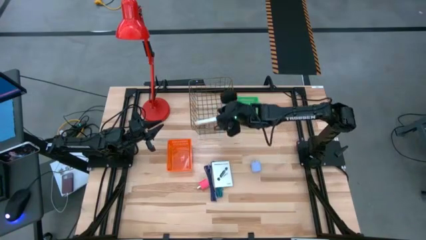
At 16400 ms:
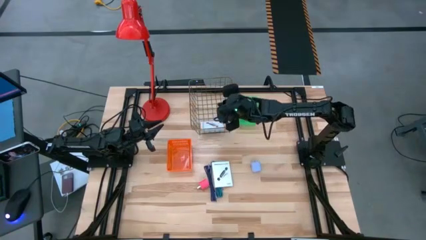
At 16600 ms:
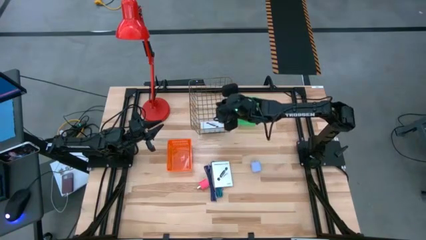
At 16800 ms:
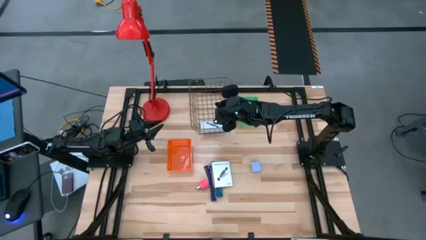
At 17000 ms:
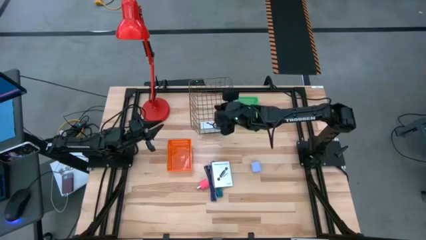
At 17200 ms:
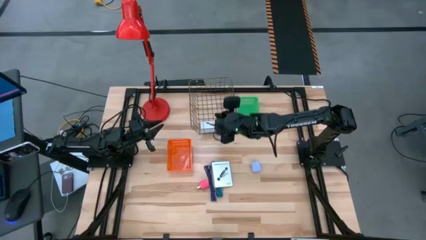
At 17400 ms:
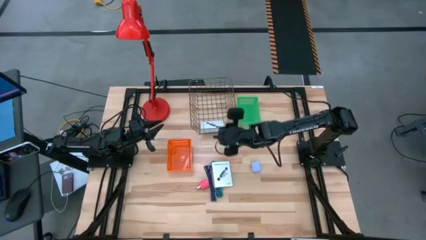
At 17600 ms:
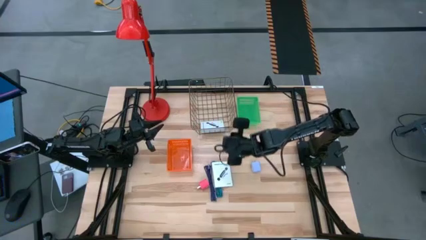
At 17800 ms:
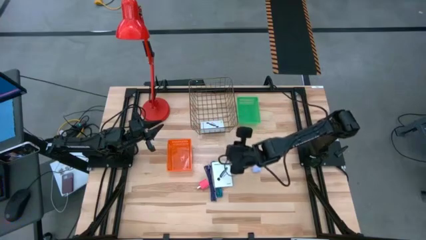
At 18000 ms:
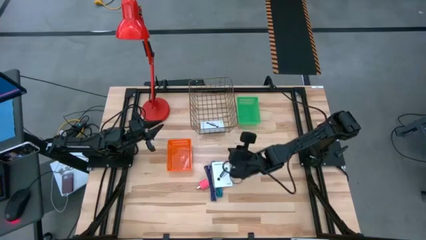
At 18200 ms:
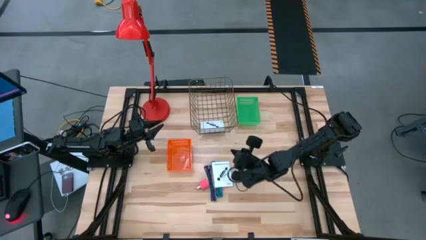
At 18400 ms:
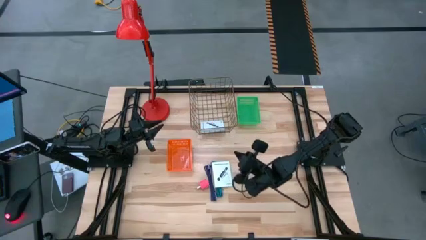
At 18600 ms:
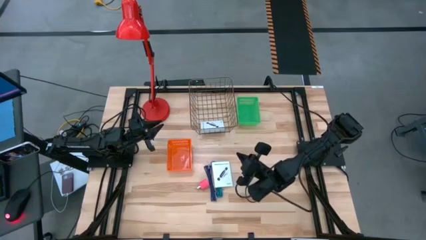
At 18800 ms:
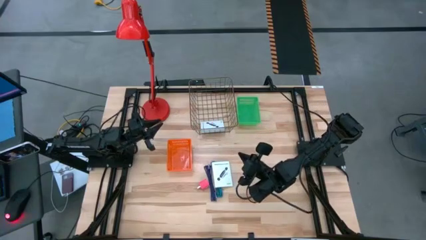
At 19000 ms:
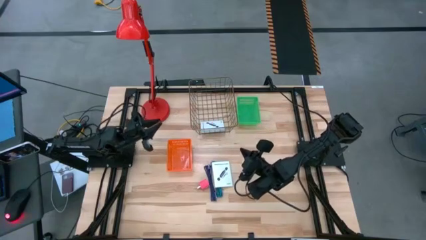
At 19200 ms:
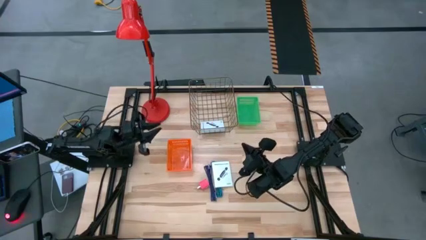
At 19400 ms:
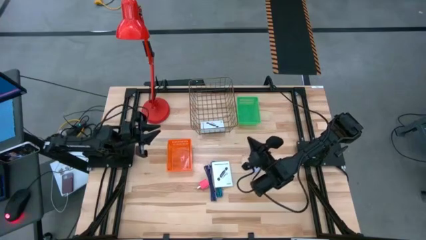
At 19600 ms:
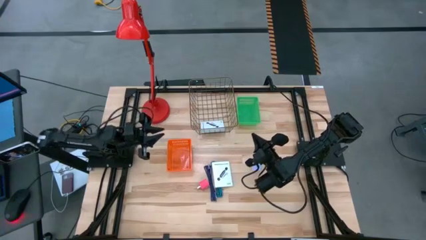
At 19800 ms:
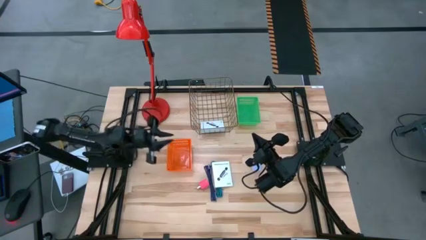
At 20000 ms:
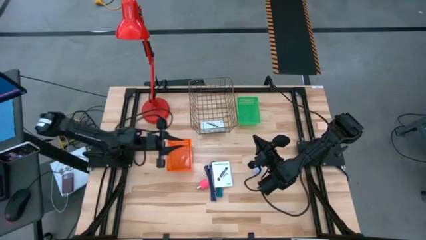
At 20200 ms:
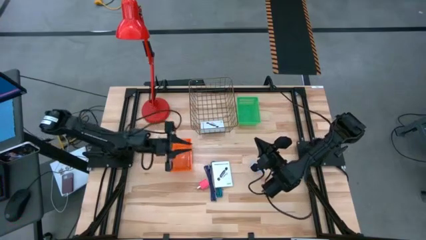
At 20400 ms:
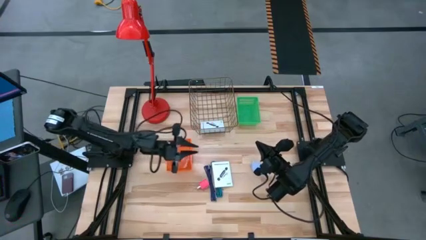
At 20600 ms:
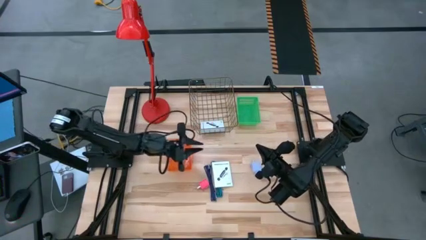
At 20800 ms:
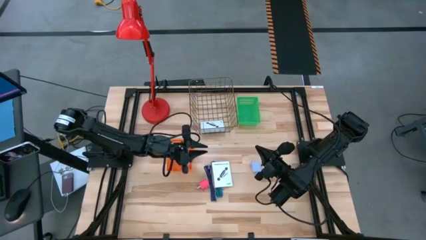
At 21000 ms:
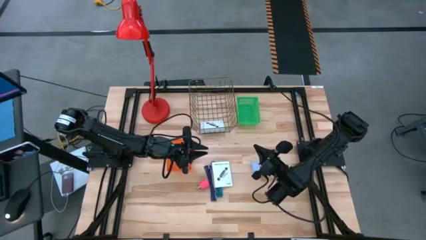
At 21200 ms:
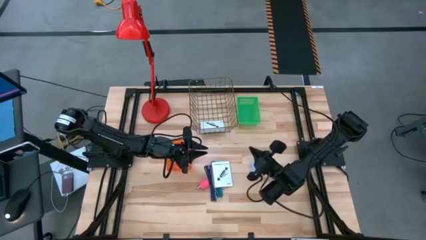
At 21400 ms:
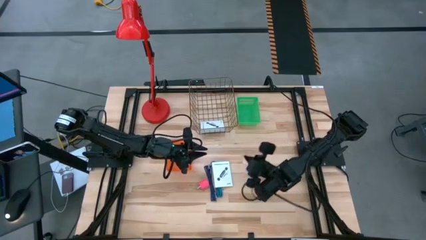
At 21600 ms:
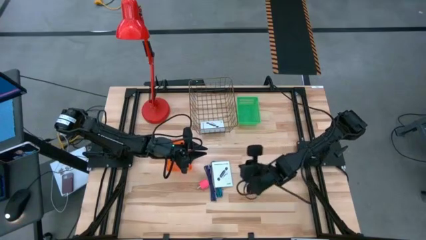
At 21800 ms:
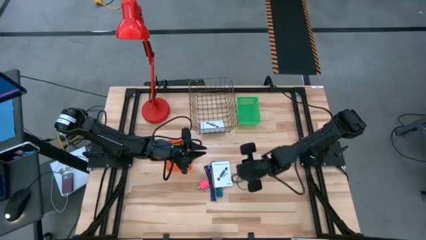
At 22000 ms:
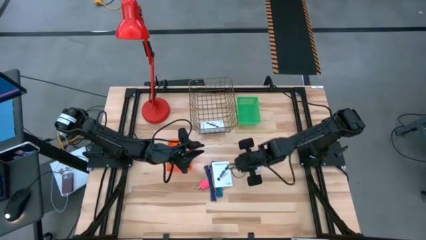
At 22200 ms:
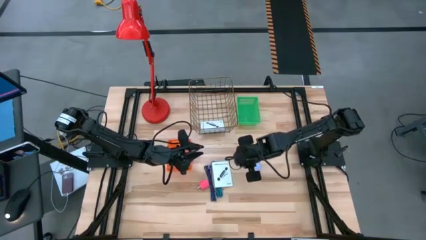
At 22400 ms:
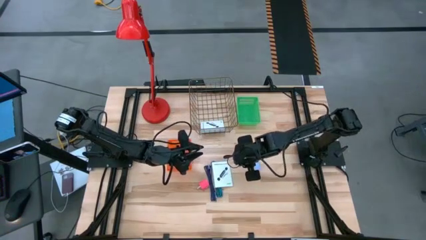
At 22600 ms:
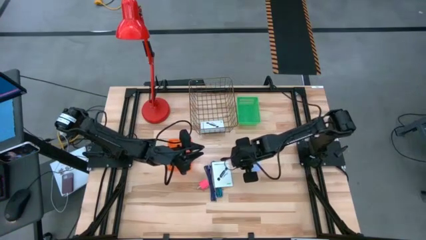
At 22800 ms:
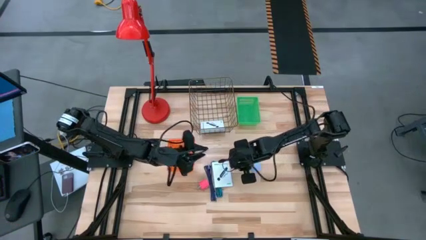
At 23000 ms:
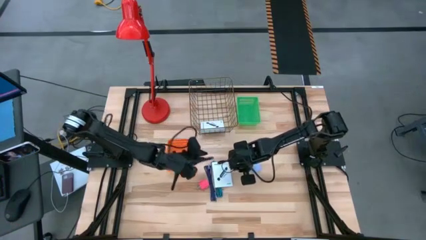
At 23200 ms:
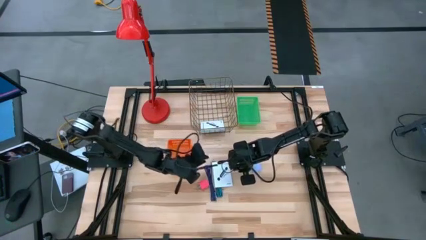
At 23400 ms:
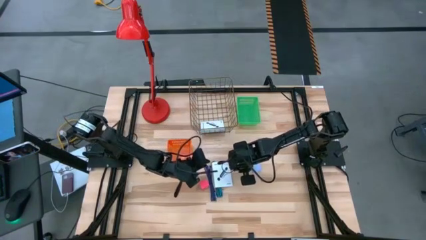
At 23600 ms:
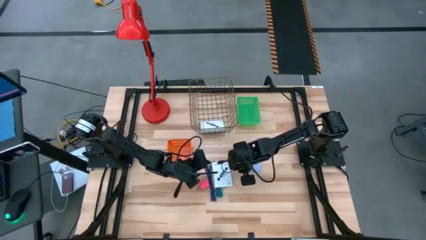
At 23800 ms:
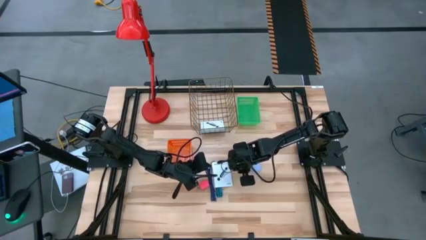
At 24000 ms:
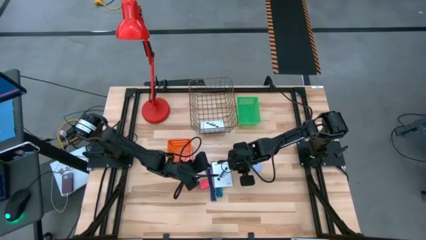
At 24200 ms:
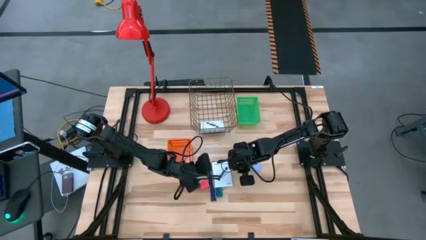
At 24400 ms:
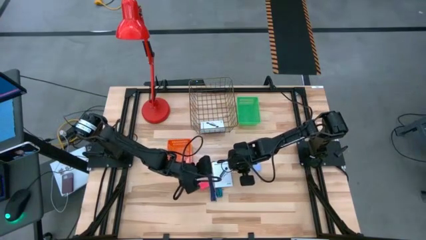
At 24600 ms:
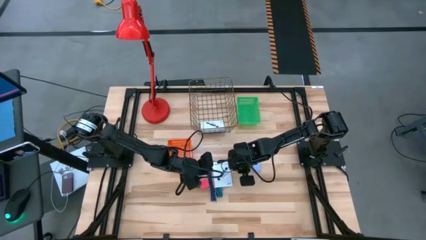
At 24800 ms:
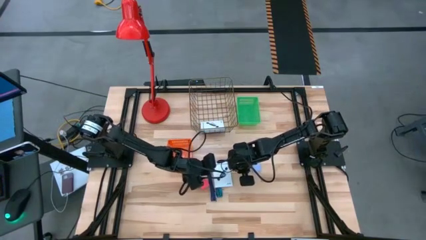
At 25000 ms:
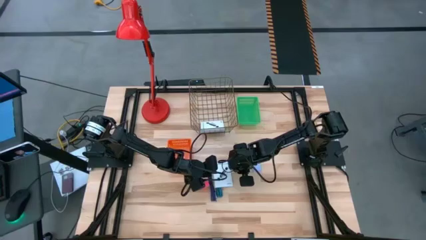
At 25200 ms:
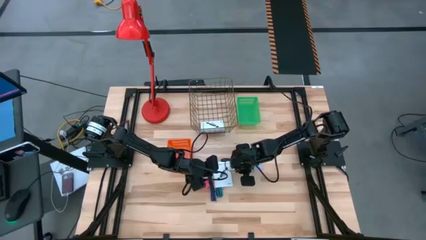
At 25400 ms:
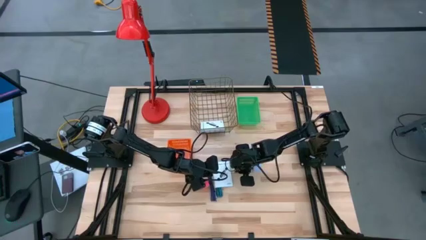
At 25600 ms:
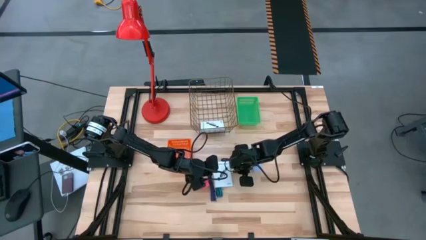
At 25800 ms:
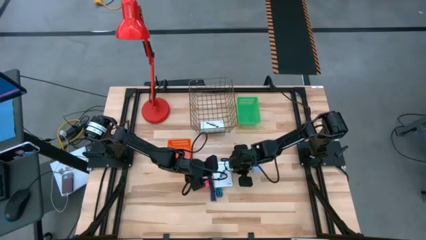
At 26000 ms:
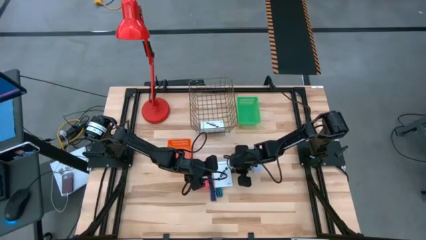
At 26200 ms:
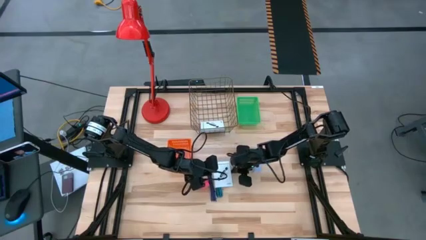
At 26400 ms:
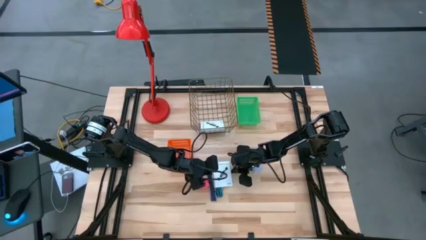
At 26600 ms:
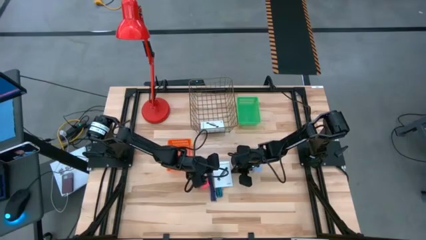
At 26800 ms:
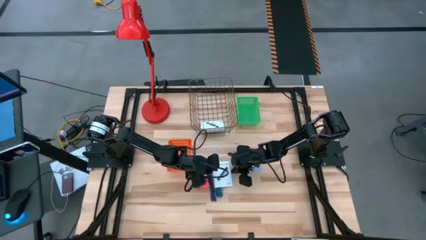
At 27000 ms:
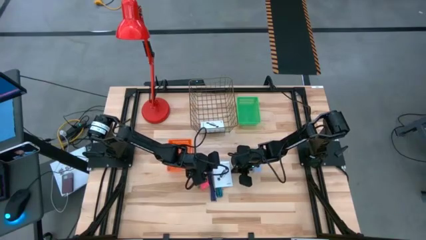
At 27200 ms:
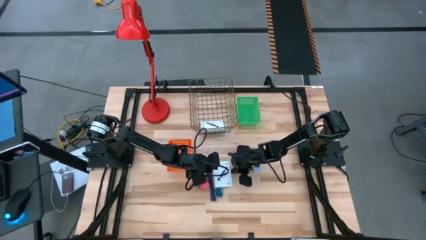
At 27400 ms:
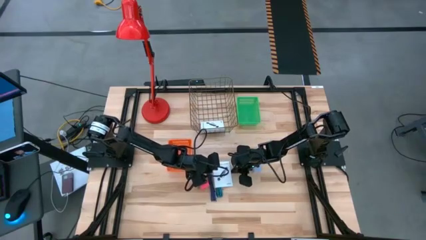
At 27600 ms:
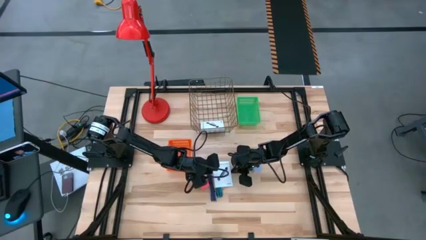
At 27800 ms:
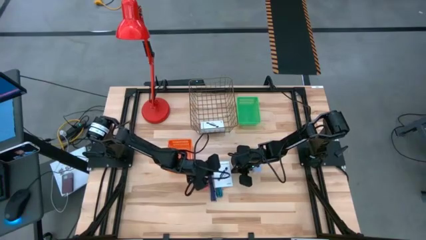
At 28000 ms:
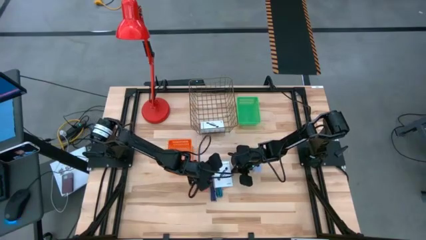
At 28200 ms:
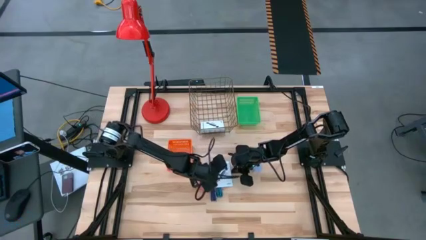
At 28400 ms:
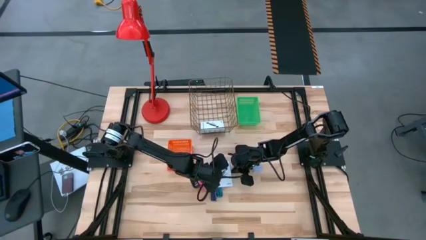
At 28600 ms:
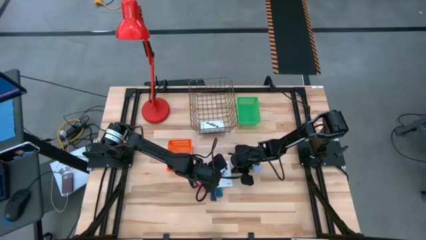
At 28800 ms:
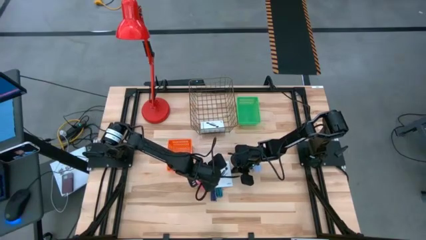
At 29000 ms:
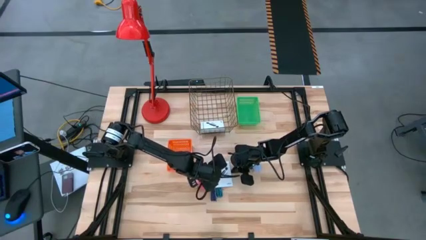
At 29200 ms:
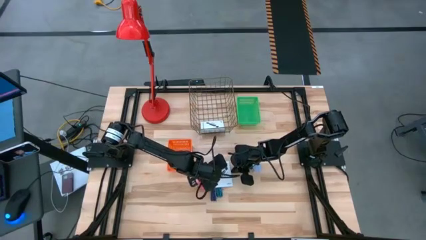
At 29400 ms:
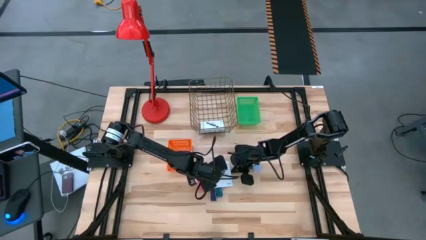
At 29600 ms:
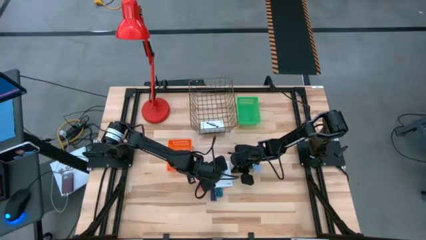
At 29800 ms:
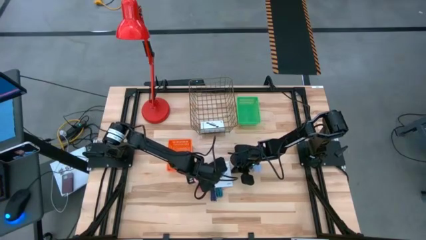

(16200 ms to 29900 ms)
Task: Pick and place items into bin
Put the card reader box into the wire basket
